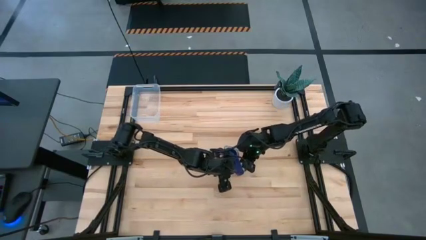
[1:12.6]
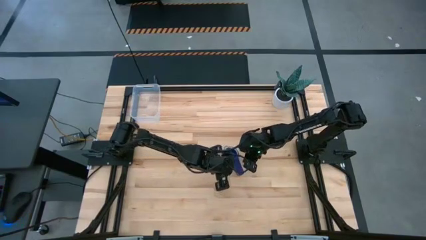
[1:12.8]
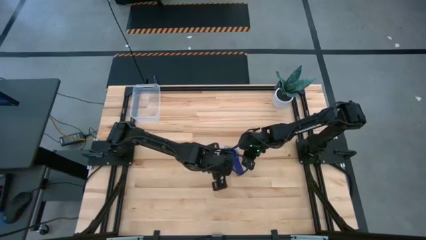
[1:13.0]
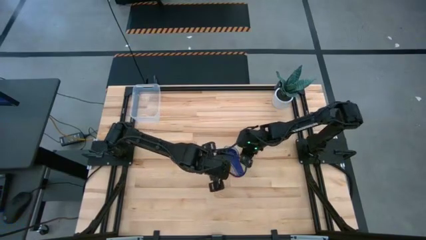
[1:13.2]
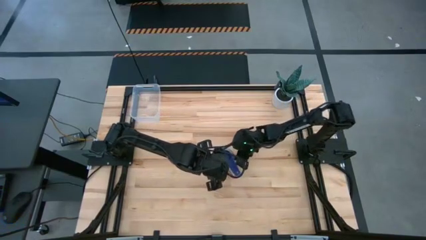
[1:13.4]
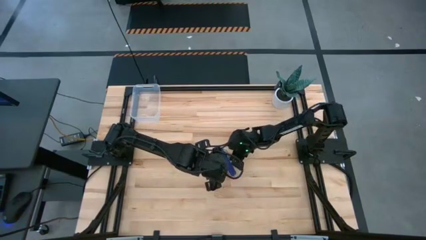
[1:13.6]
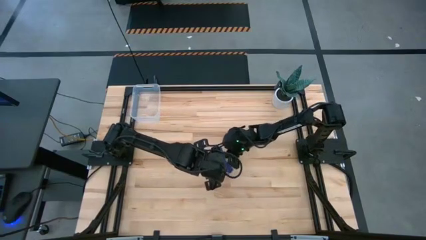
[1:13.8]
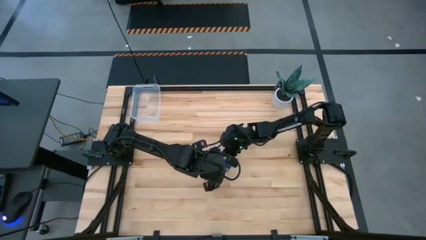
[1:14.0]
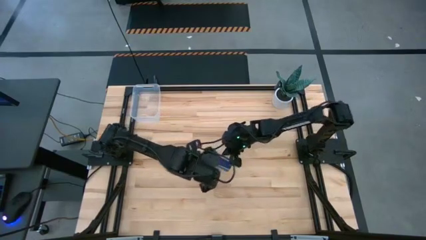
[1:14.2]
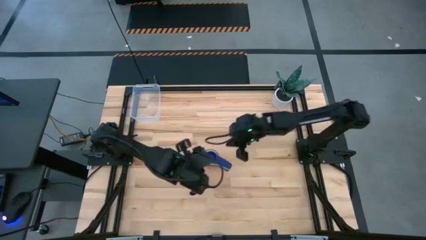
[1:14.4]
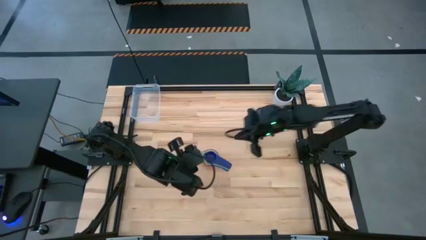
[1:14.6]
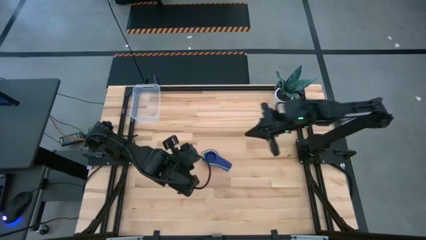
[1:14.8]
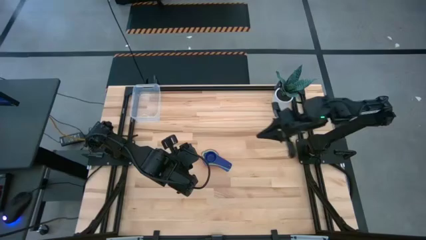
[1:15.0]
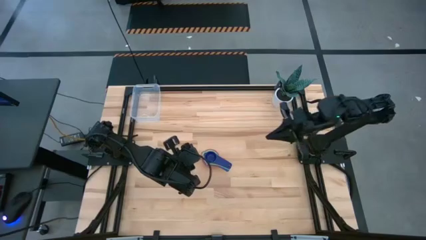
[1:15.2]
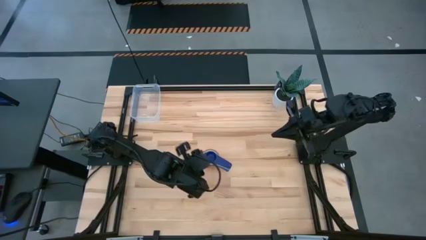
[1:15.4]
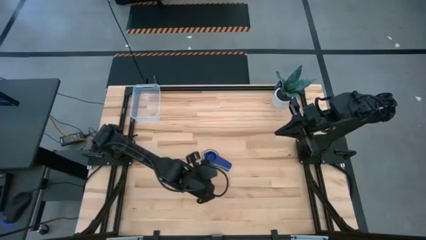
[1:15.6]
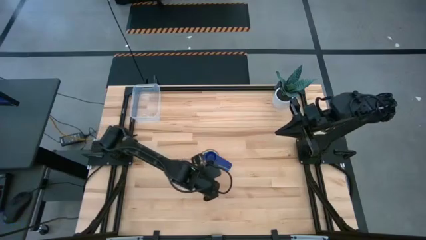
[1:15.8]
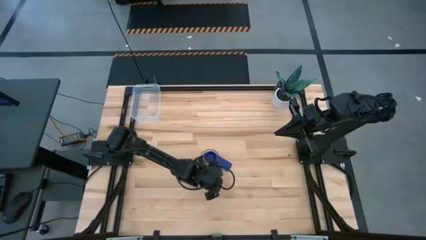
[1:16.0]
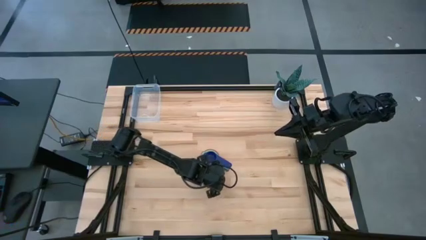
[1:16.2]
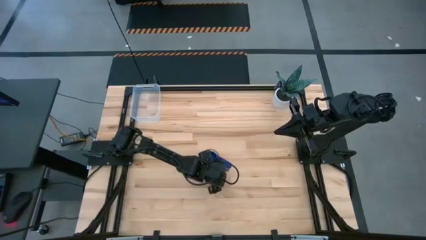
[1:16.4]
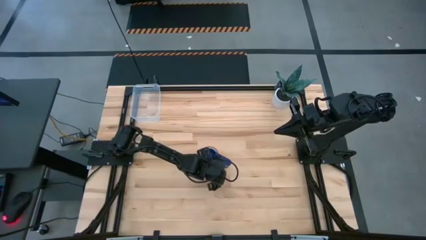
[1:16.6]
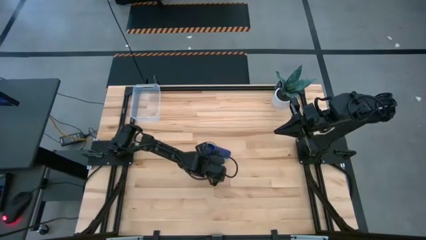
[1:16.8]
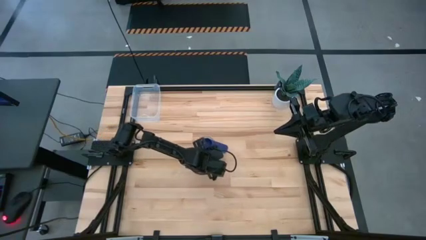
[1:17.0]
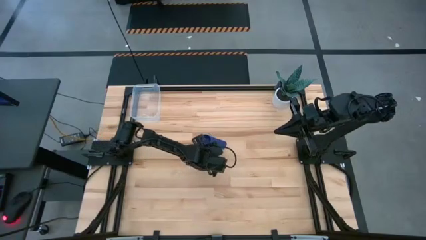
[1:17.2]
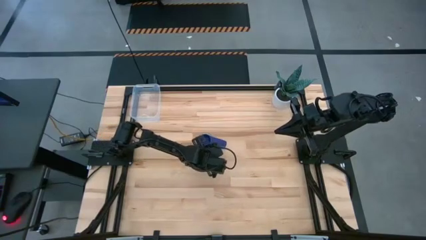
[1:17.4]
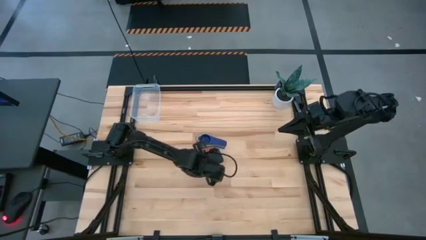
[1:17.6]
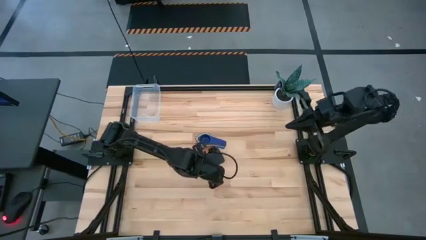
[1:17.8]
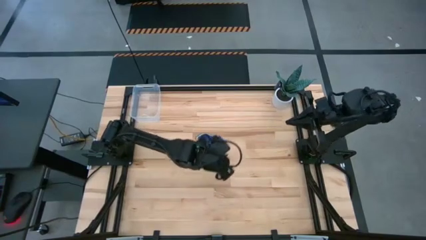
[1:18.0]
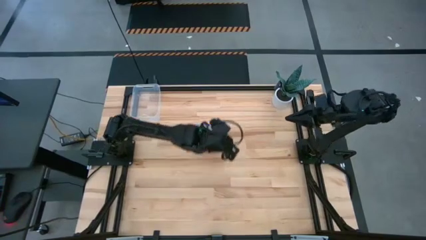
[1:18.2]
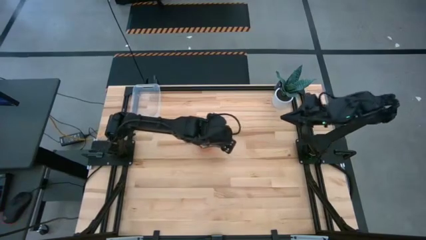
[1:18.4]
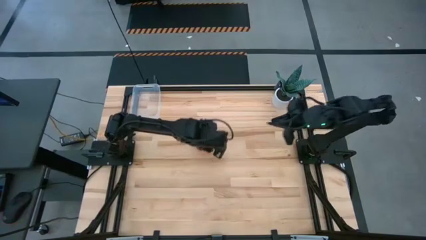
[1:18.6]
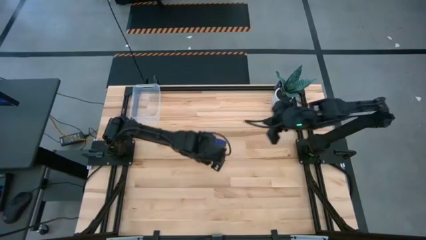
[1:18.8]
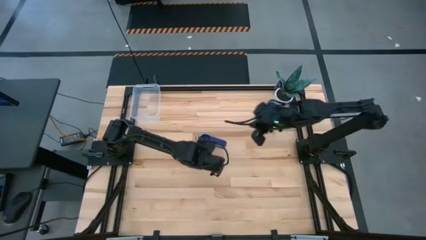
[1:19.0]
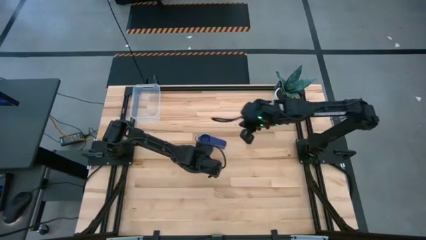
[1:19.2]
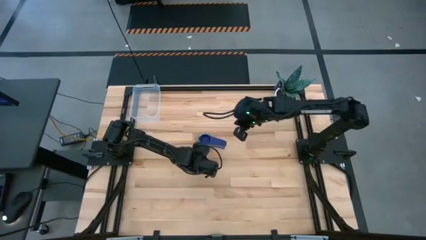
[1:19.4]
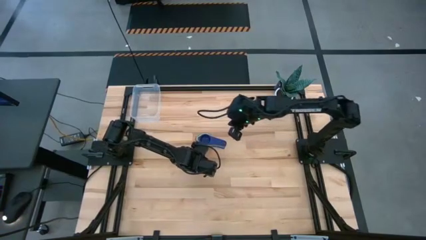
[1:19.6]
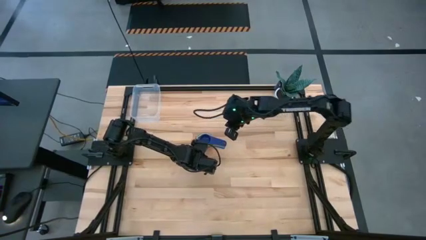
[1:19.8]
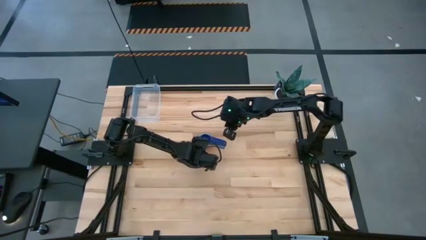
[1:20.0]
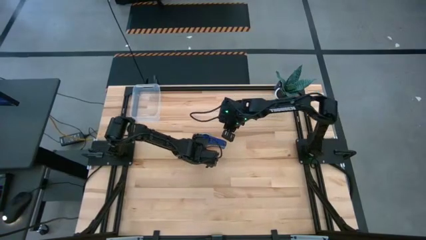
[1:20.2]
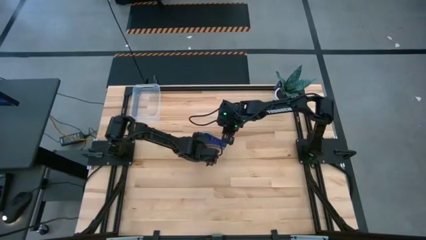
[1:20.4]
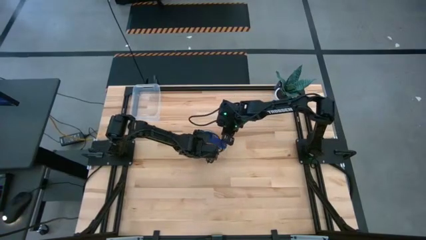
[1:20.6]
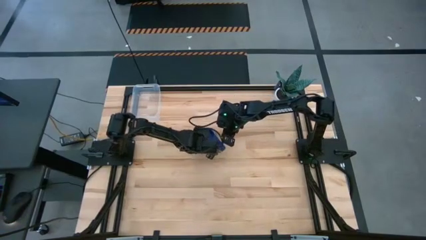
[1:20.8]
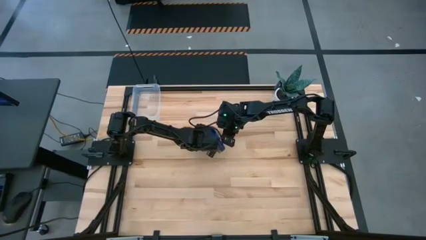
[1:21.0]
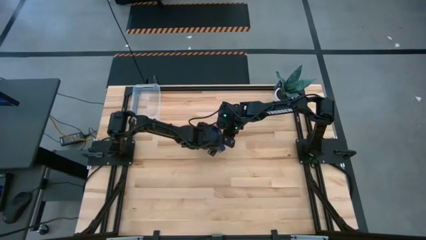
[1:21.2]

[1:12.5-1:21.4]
Task: Nest measuring cups in basket
Move the measuring cups to the middle

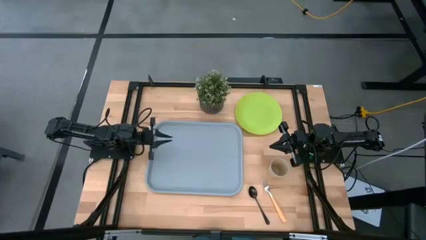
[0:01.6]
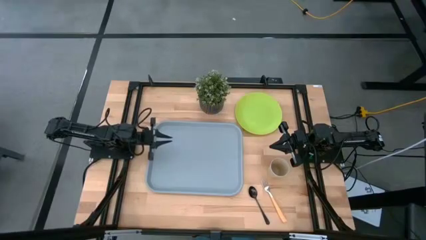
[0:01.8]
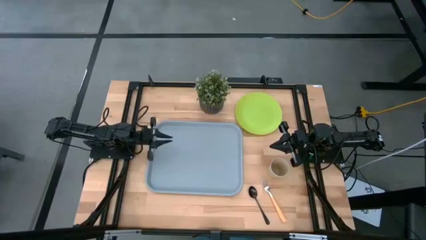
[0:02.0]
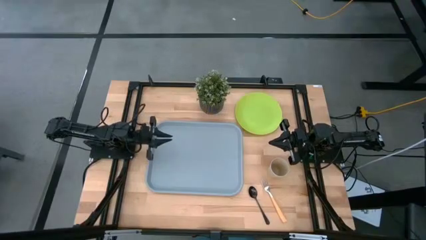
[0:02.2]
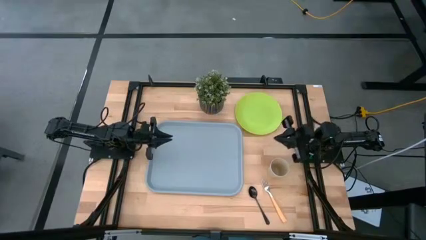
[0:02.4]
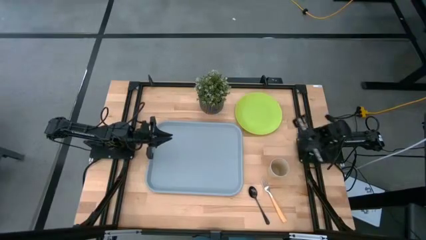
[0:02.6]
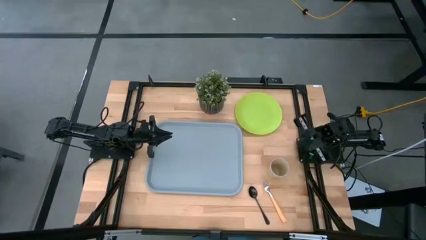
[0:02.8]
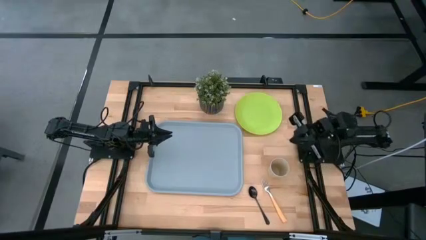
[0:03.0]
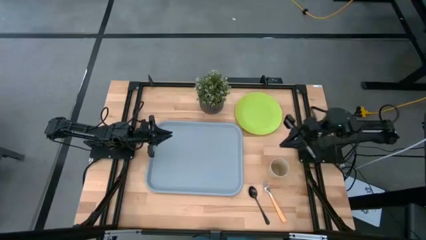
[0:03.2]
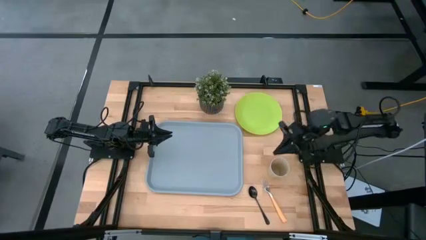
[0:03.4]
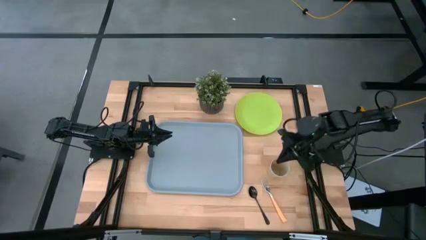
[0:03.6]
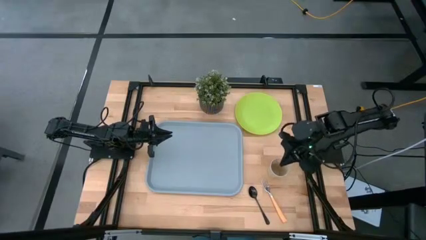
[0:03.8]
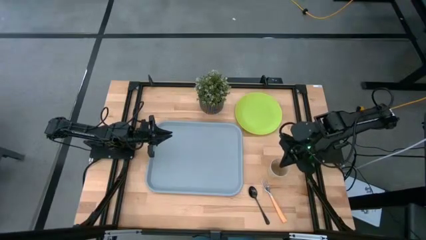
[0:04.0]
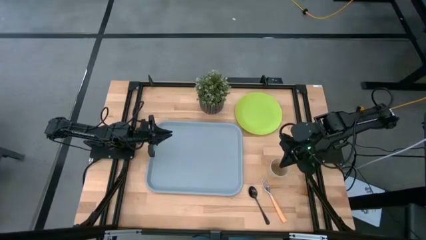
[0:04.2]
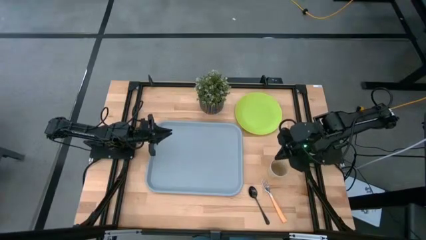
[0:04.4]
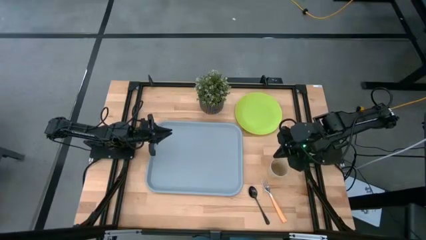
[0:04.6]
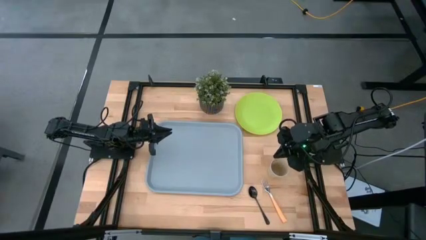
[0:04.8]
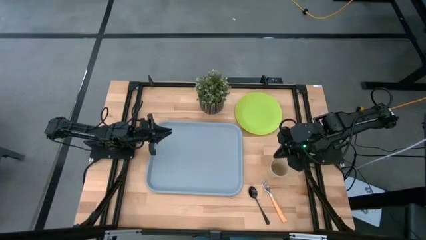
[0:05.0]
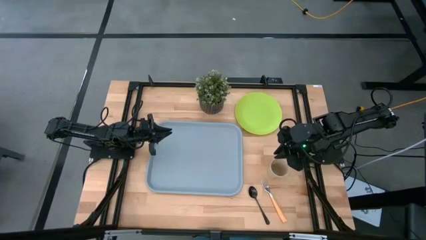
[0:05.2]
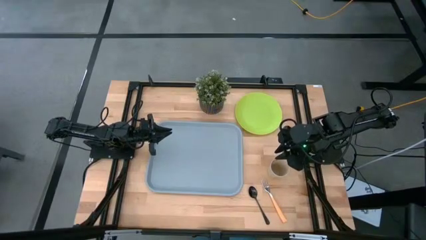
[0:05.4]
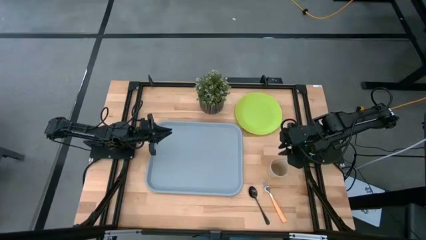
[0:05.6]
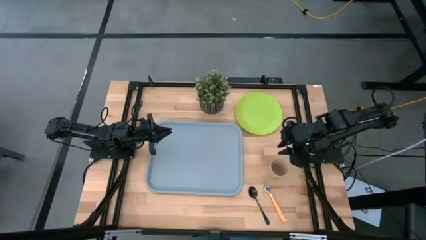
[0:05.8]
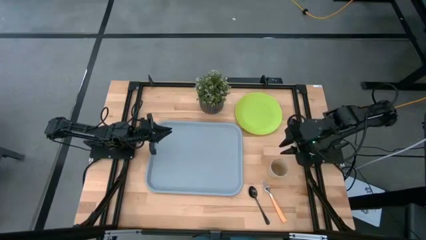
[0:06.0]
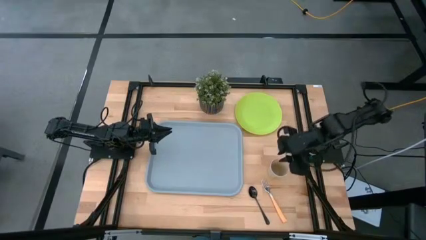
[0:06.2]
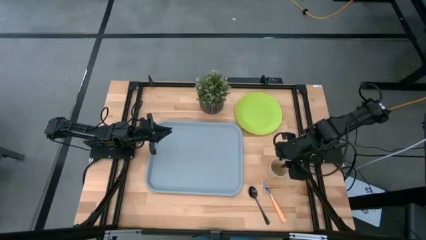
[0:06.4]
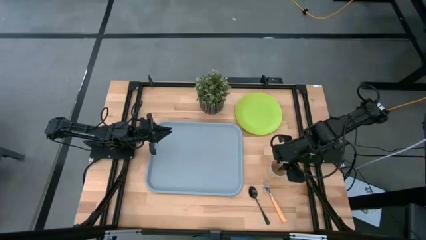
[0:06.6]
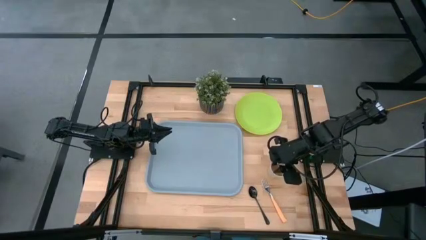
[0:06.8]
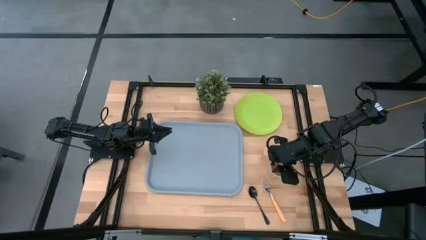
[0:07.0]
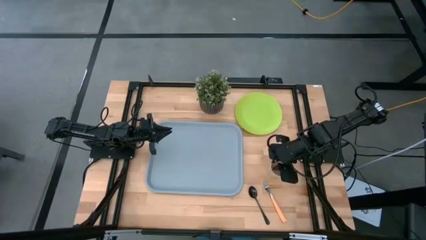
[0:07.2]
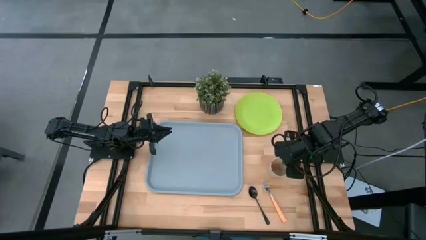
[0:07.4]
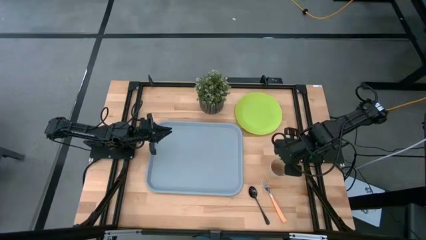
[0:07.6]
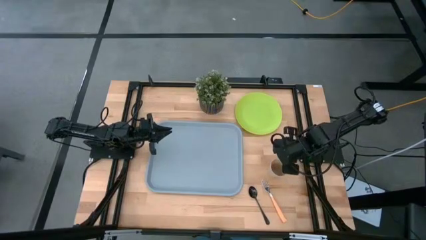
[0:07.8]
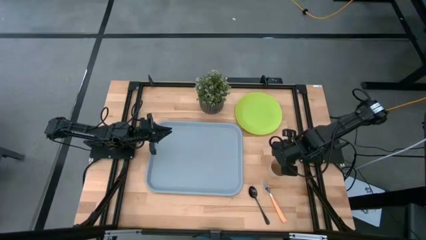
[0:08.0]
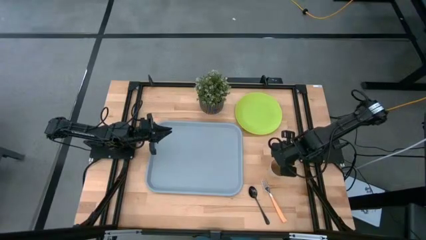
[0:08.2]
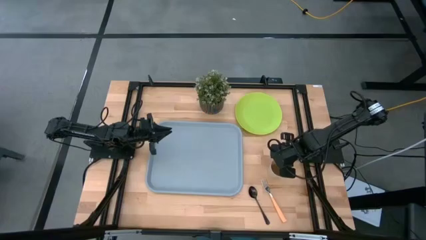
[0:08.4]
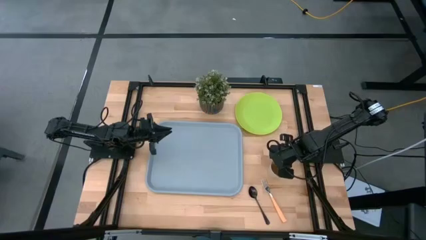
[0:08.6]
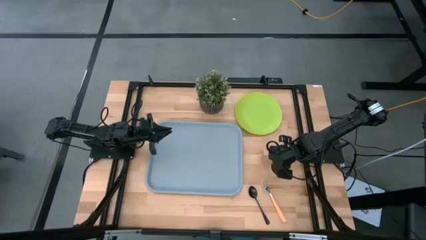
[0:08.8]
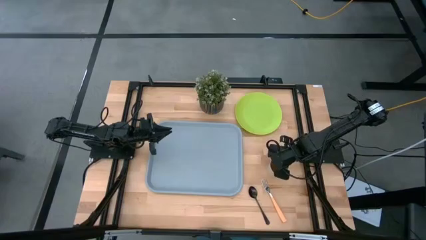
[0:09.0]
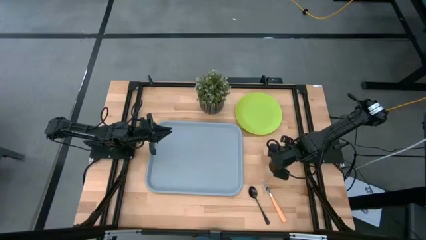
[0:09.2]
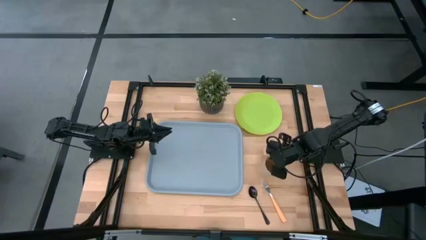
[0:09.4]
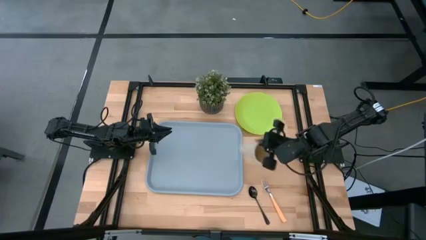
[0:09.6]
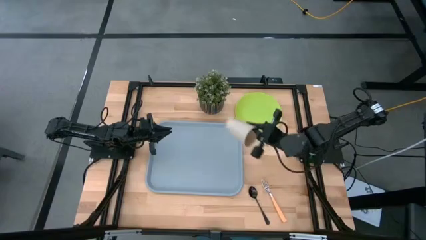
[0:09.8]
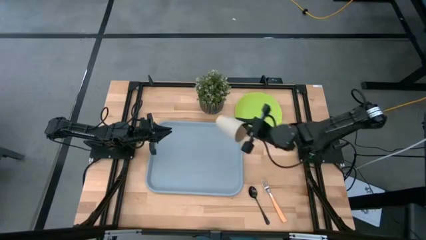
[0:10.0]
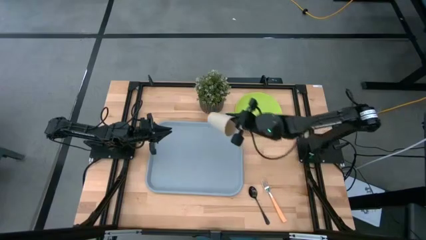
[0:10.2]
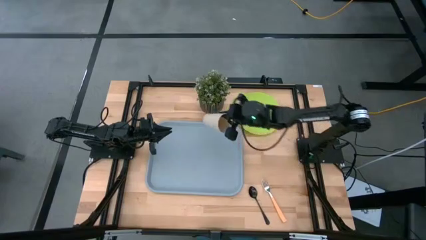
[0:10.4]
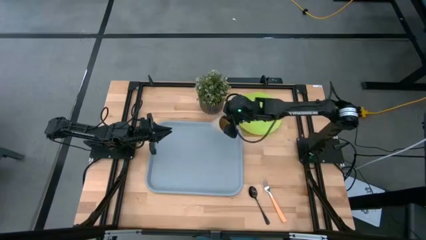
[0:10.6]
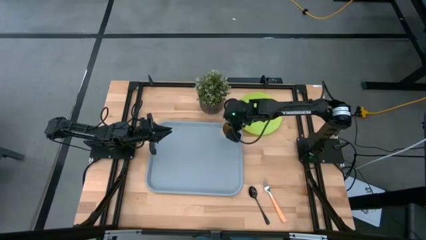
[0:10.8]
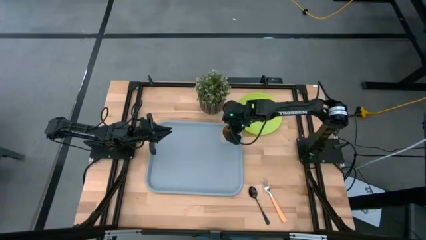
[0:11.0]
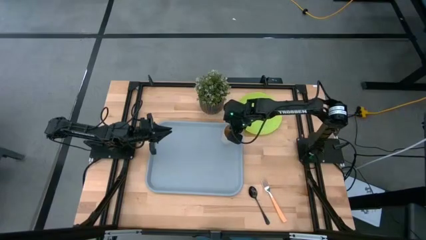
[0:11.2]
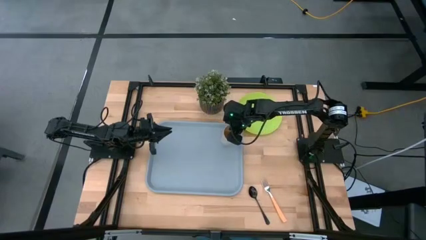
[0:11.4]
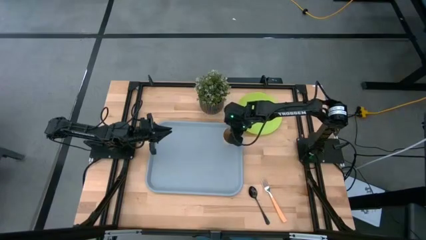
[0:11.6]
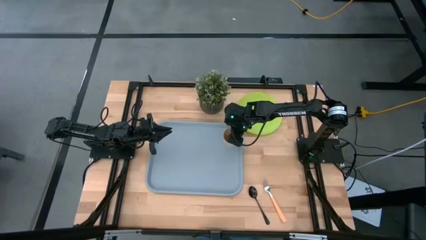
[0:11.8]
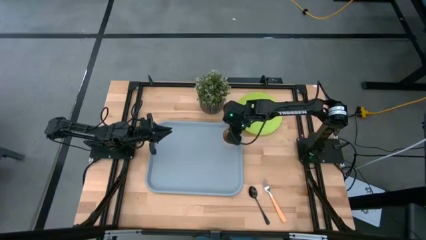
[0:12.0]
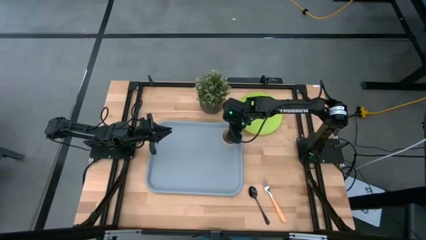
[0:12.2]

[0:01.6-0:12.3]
Task: Pick and place plate/cup/fork/spoon on tray
Put the white cup on the gray serving tray
